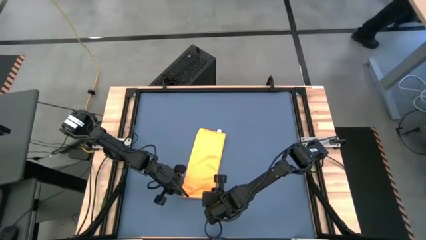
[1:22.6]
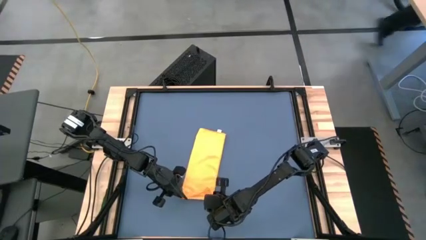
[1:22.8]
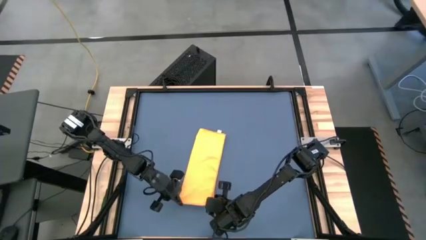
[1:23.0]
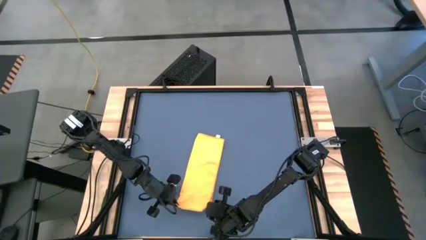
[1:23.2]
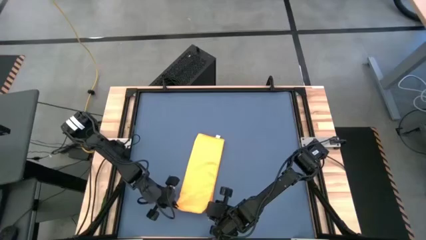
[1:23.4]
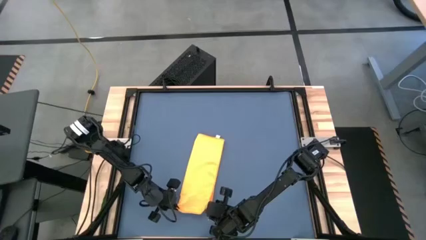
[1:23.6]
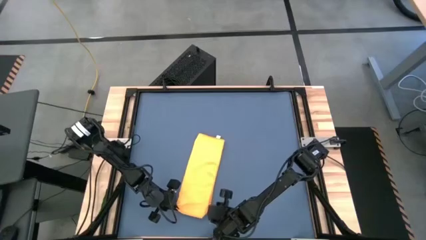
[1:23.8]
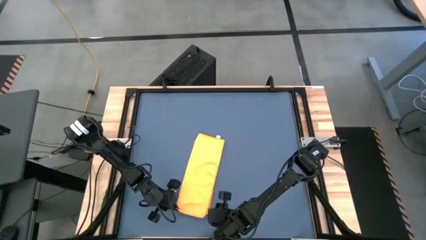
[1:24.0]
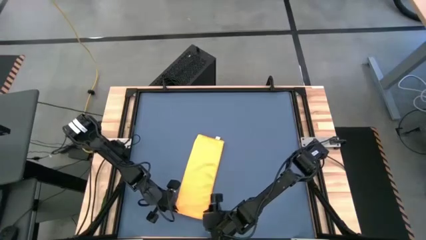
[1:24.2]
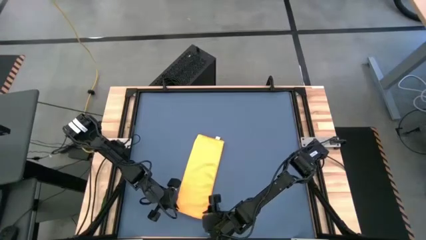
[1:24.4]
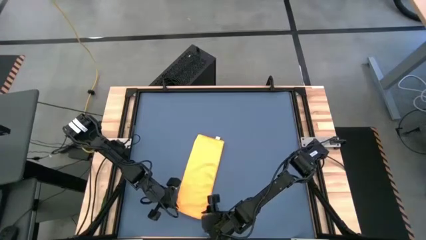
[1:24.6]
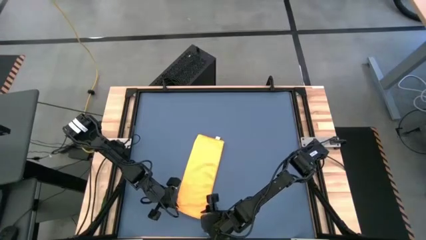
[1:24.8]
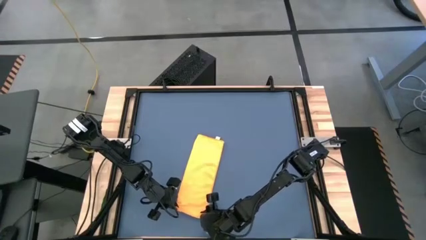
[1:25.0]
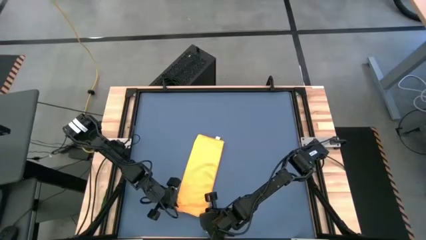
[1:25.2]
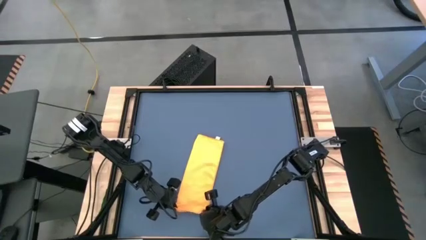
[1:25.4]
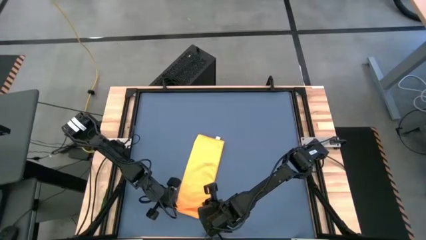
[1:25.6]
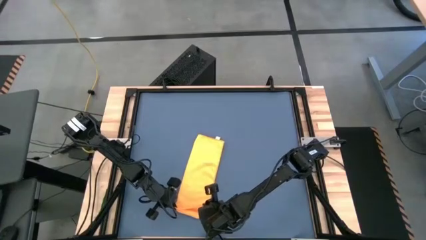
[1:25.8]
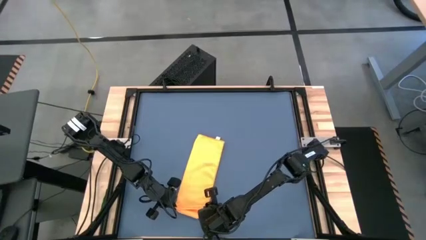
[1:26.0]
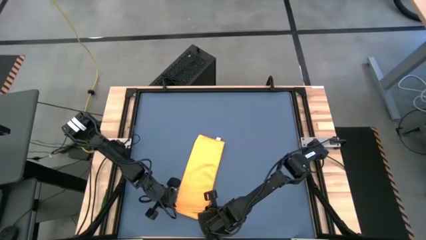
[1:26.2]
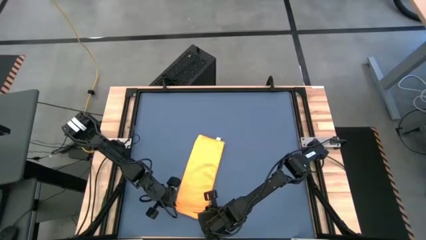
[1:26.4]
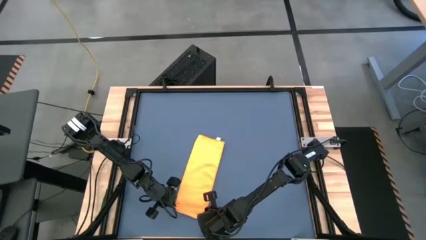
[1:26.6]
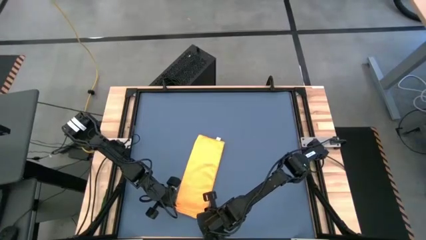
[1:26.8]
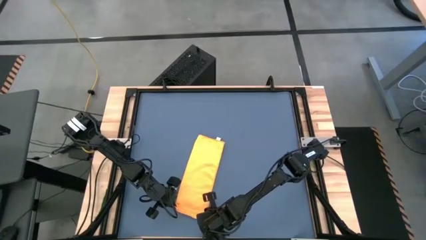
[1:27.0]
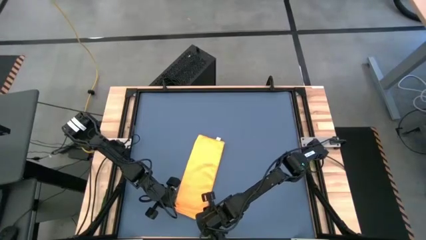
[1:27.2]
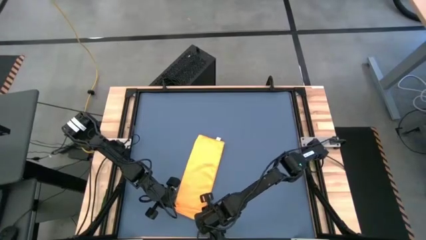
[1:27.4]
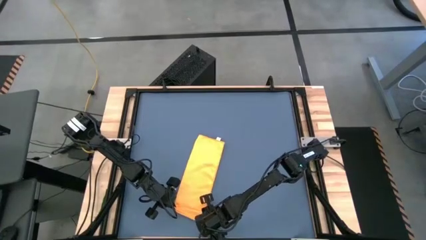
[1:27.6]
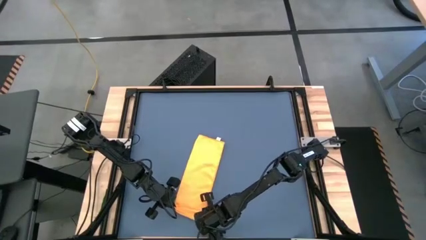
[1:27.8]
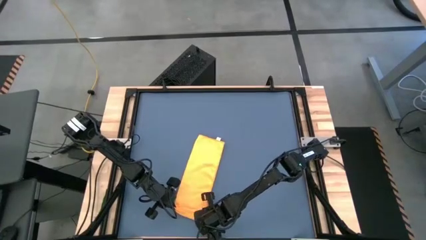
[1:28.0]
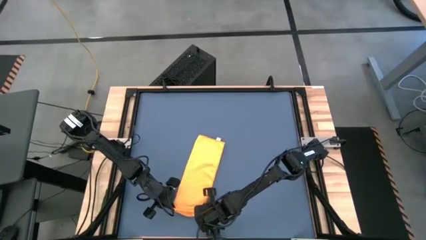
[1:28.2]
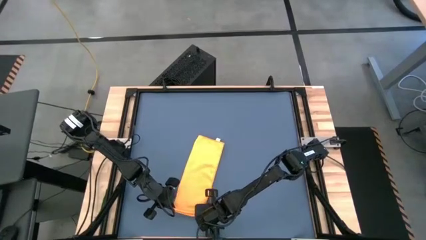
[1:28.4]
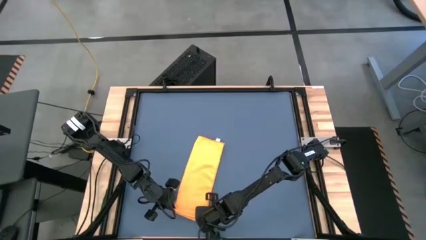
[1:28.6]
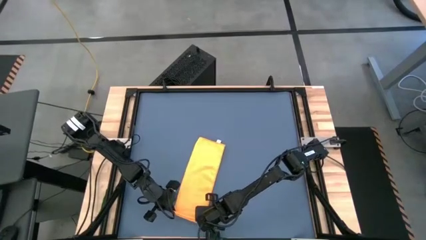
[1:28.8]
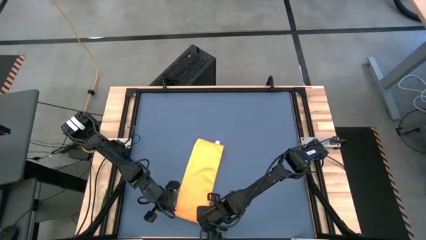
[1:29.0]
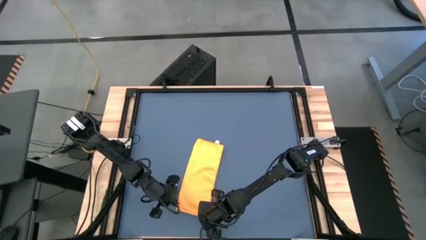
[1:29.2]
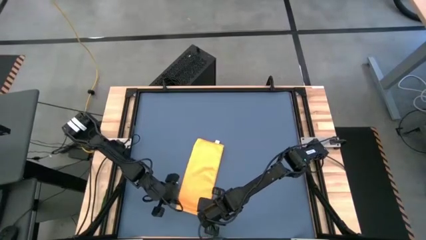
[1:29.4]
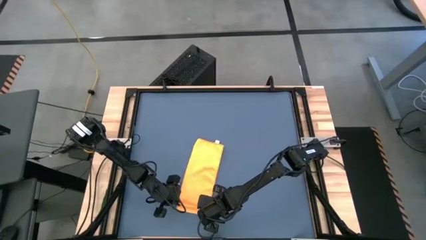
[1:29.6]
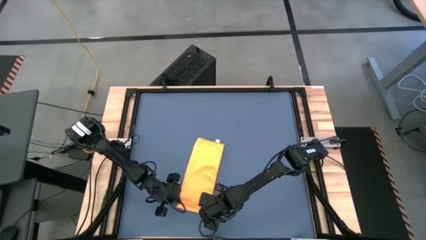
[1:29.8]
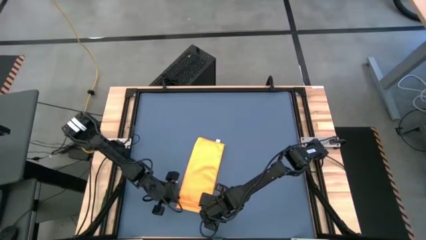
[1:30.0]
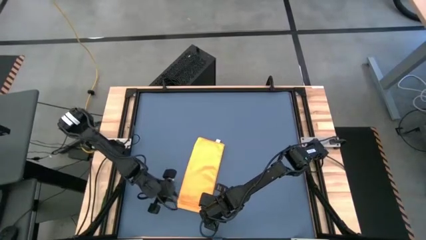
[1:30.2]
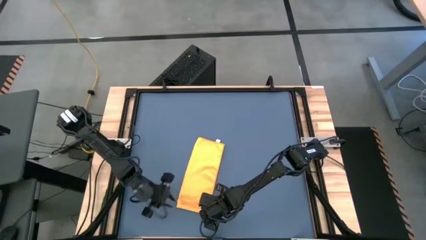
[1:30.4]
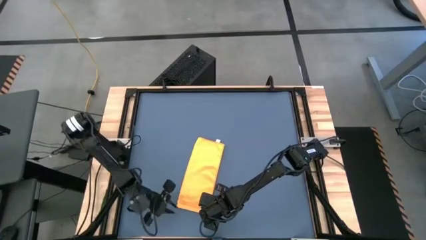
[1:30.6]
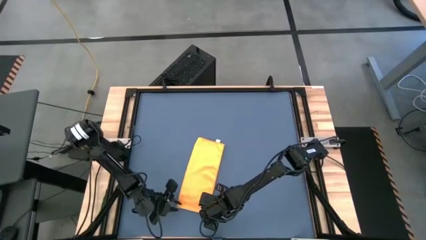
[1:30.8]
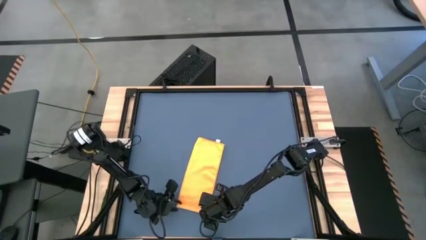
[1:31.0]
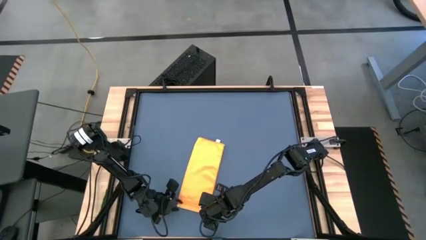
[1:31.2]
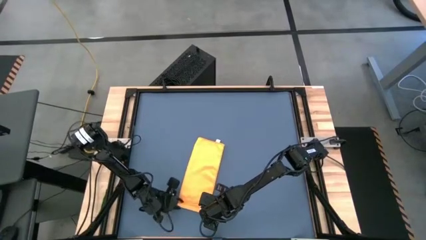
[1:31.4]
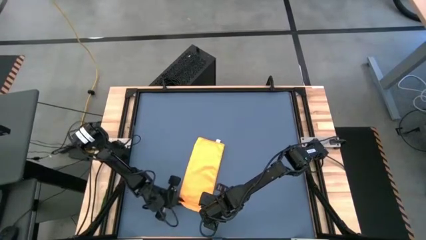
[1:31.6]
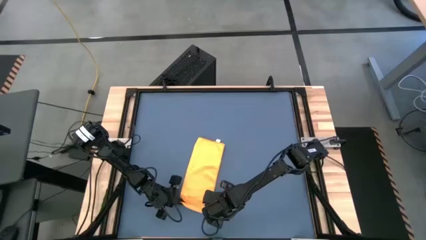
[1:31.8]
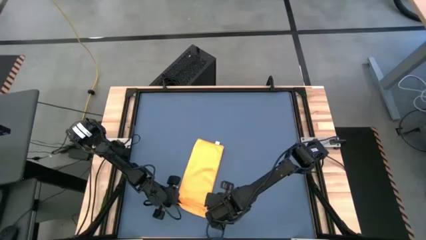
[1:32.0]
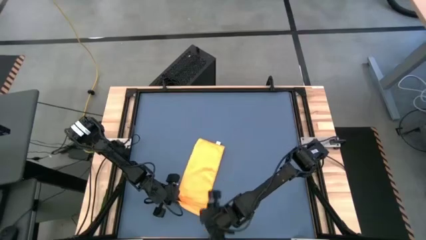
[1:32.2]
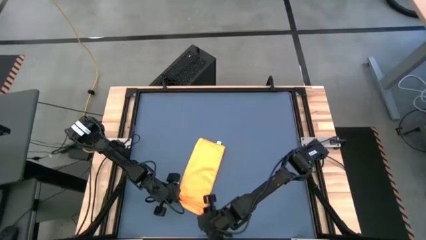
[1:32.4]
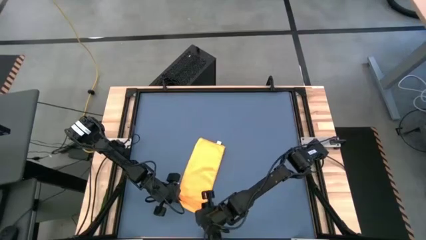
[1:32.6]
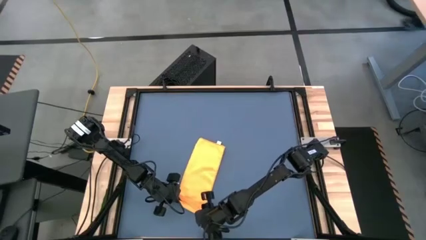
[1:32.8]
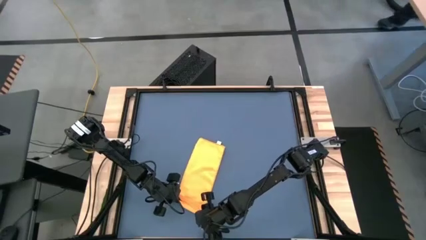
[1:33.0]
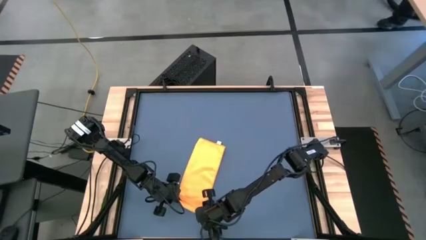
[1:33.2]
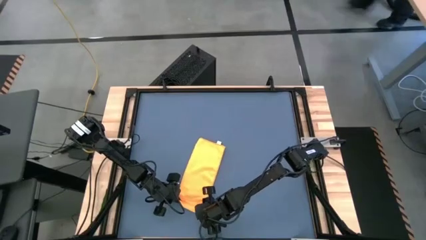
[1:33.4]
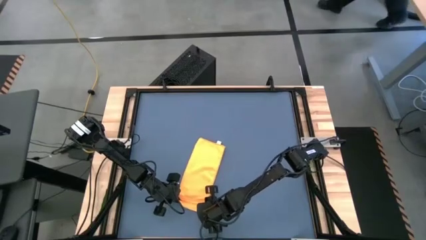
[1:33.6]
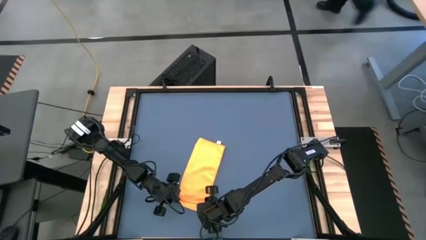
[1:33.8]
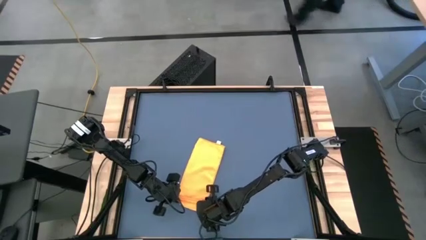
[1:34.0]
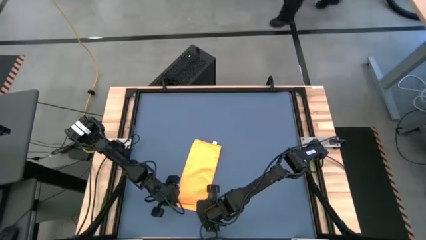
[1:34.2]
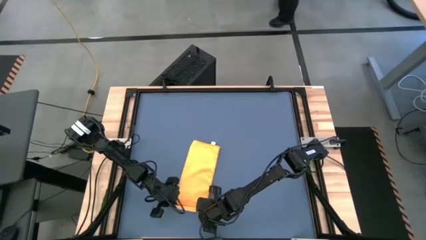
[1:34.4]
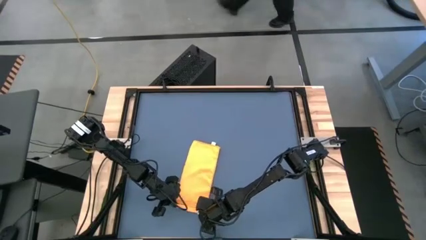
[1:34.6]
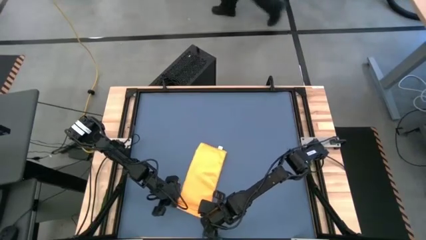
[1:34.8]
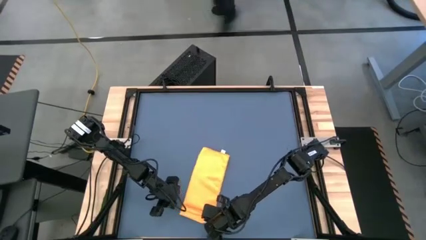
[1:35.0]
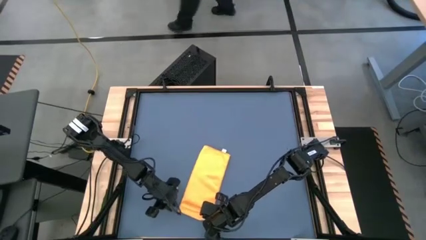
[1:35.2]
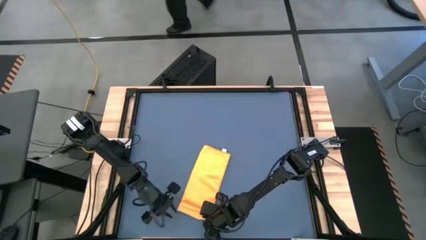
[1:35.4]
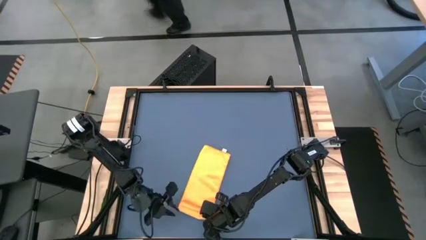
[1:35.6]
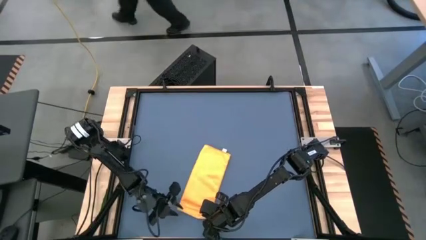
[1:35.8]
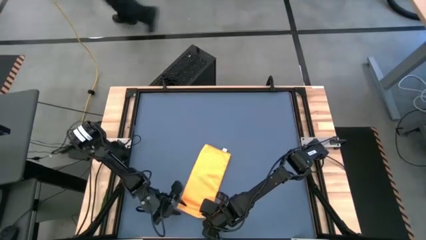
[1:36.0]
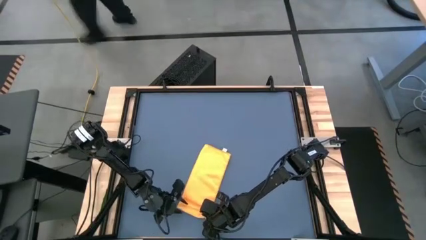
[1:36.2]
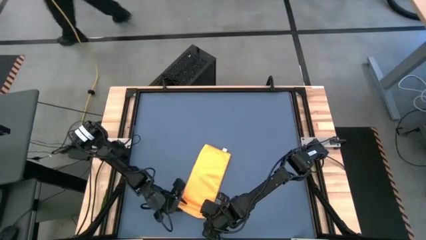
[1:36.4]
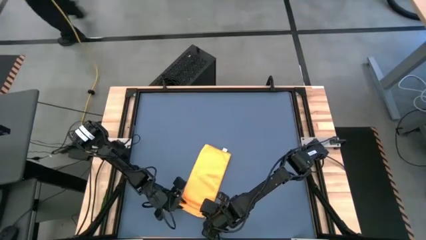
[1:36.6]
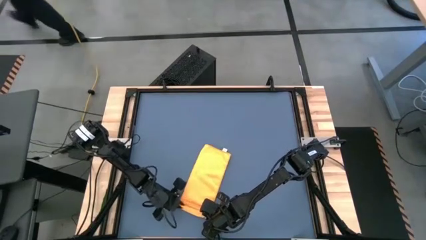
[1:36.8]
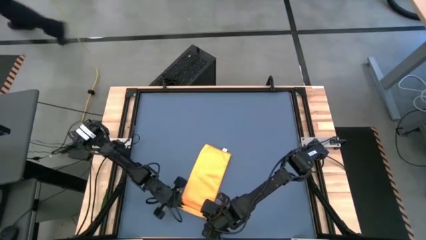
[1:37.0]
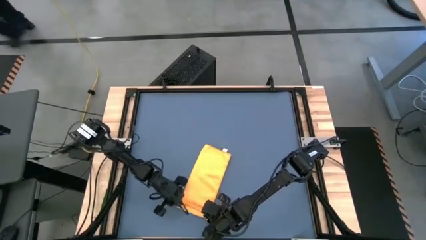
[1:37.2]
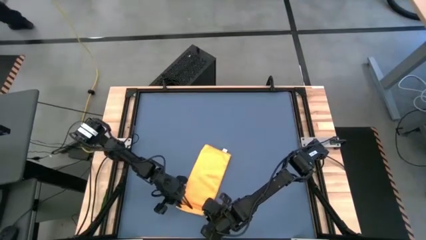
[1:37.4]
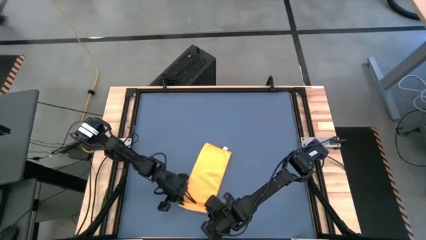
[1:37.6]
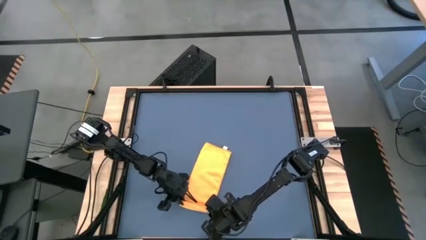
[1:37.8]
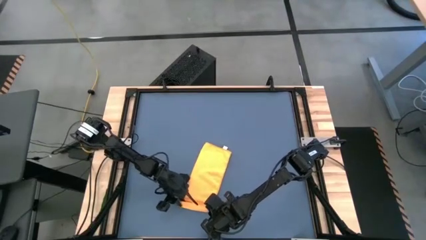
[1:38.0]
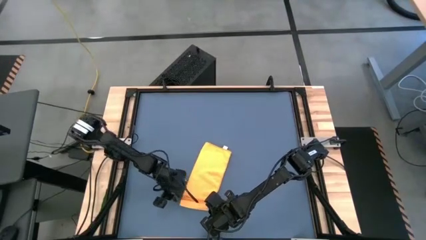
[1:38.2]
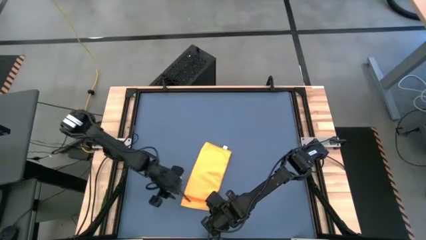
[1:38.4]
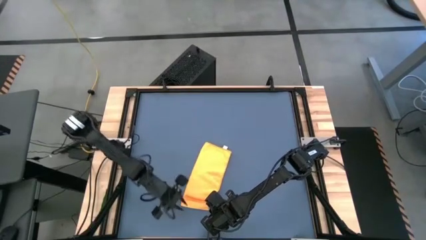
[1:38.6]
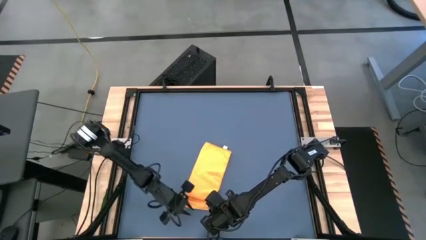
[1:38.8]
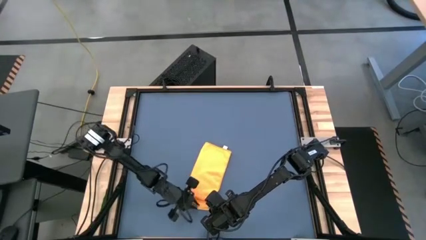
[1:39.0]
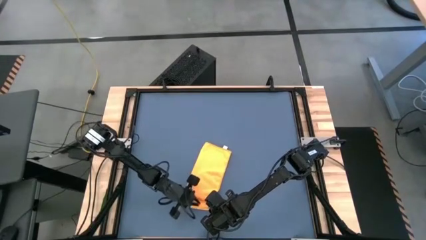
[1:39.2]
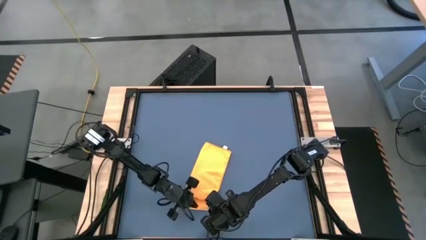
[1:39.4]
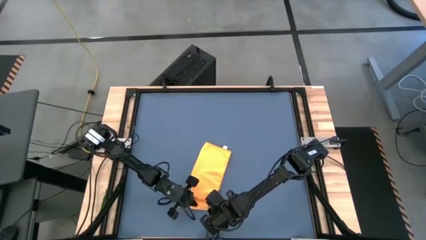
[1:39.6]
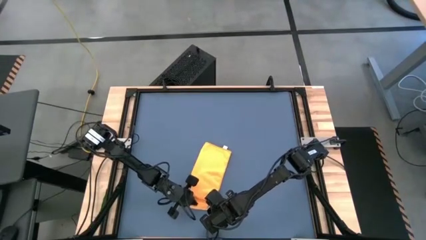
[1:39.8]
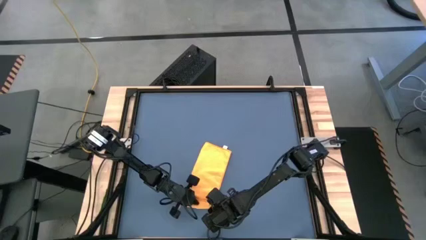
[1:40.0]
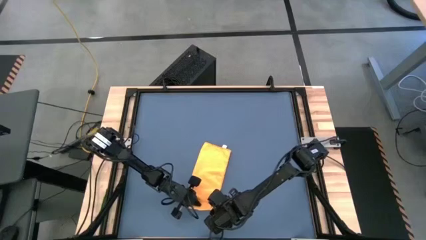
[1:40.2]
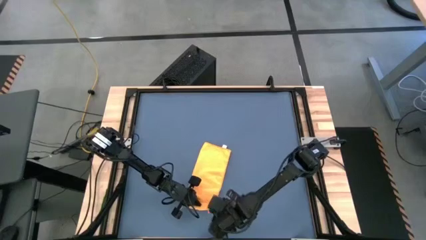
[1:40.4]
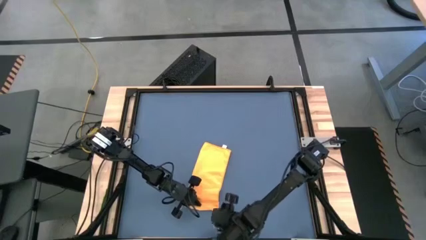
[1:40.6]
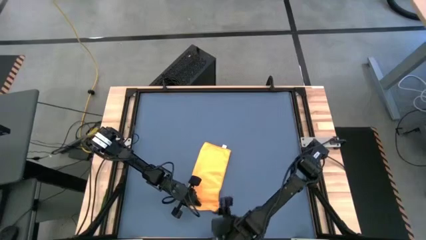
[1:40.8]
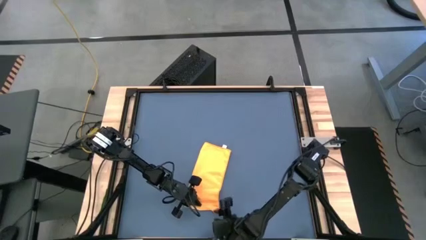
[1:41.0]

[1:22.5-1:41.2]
Task: Roll towel
Roll the yellow microfiber cloth
